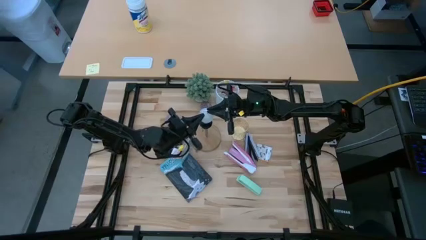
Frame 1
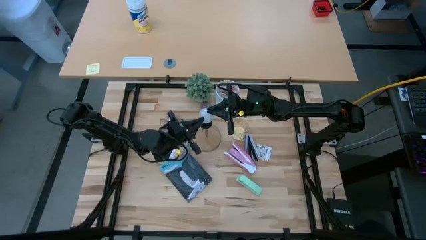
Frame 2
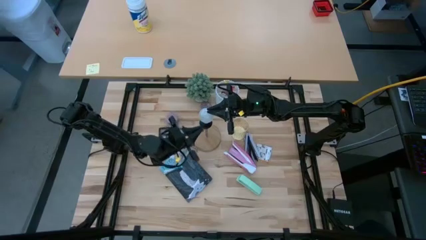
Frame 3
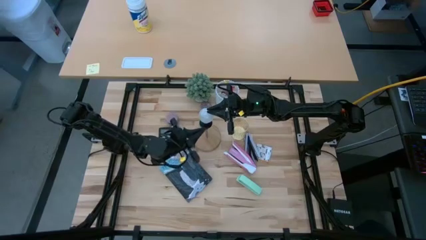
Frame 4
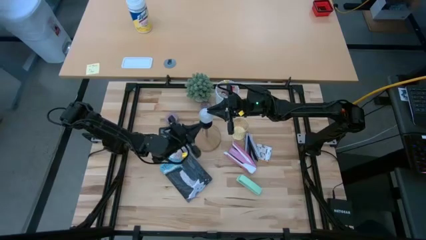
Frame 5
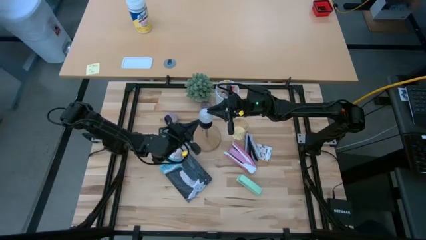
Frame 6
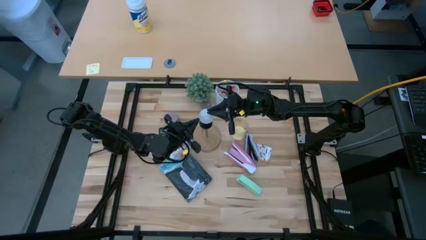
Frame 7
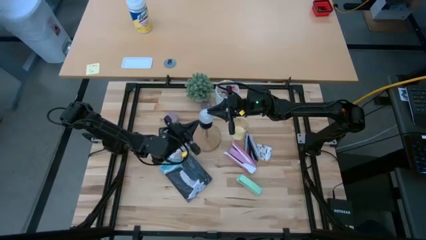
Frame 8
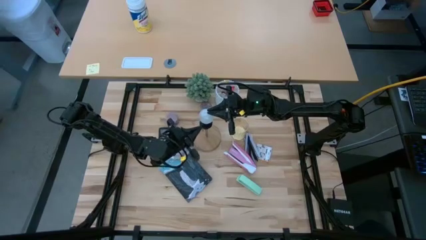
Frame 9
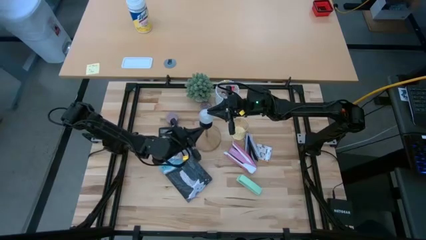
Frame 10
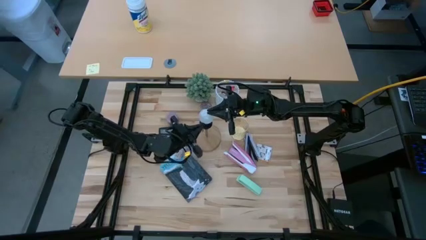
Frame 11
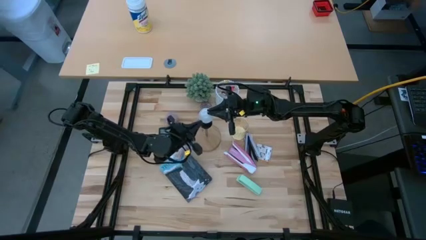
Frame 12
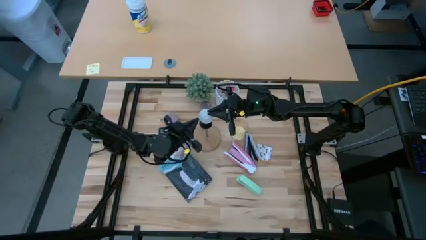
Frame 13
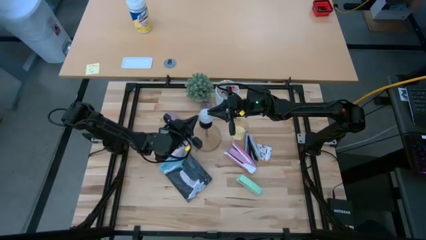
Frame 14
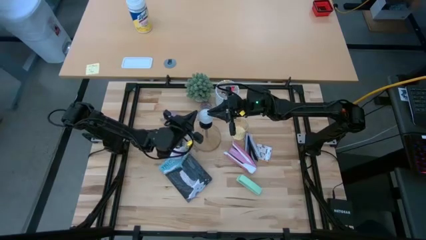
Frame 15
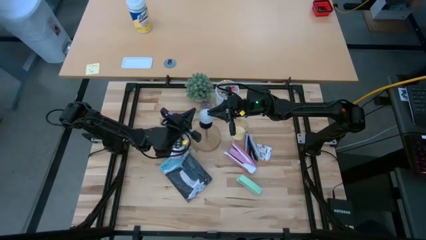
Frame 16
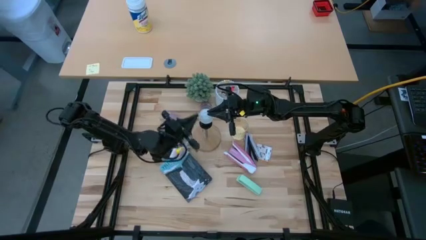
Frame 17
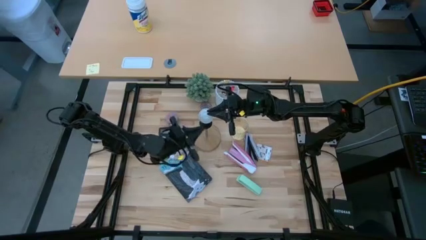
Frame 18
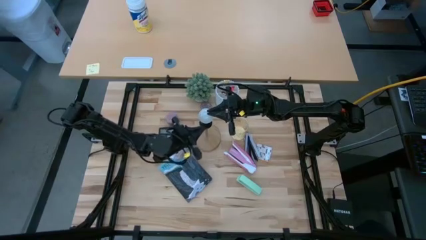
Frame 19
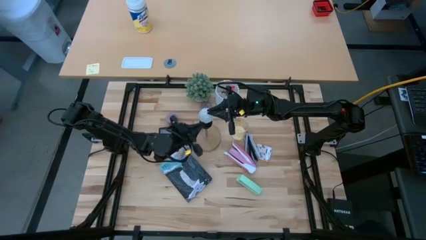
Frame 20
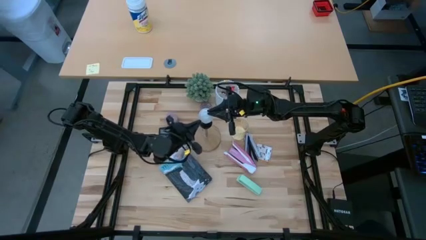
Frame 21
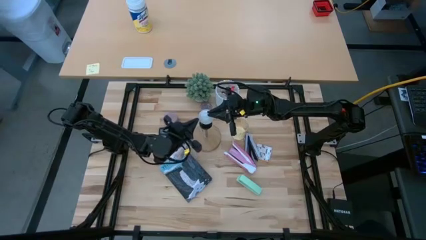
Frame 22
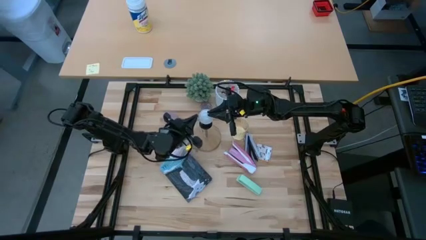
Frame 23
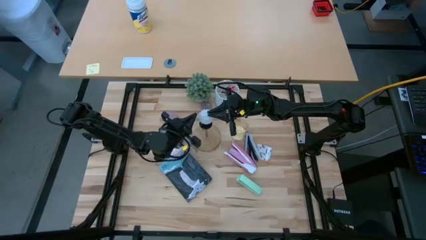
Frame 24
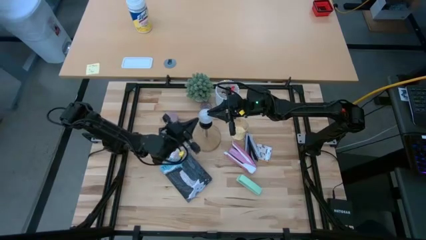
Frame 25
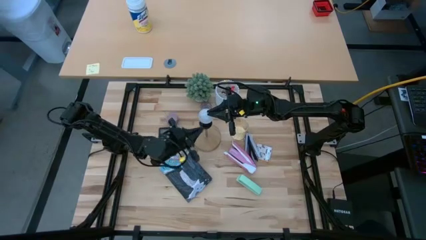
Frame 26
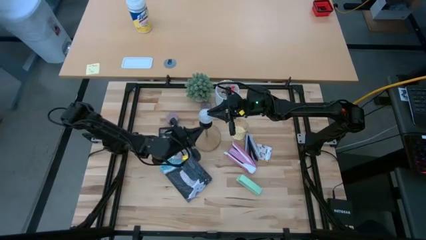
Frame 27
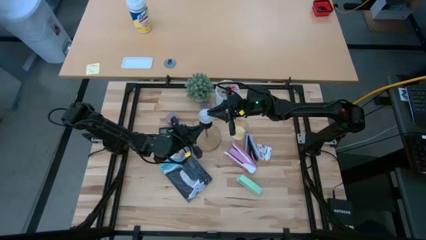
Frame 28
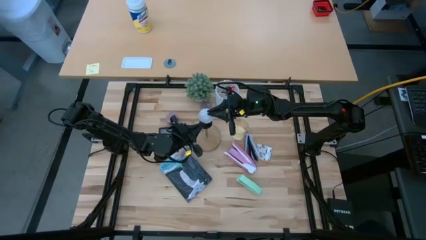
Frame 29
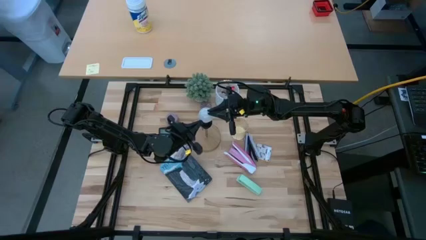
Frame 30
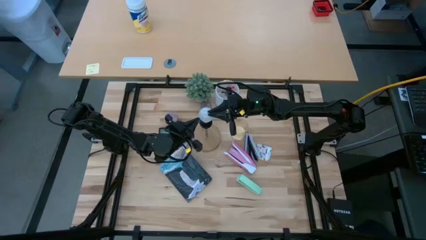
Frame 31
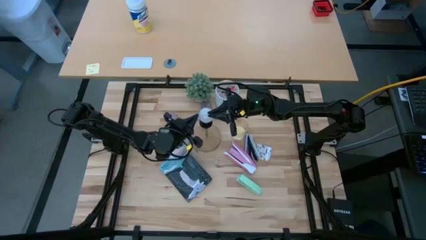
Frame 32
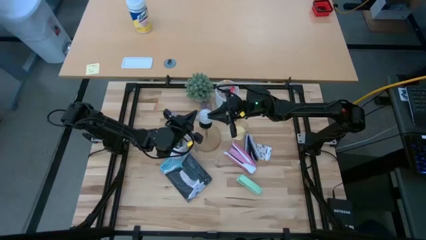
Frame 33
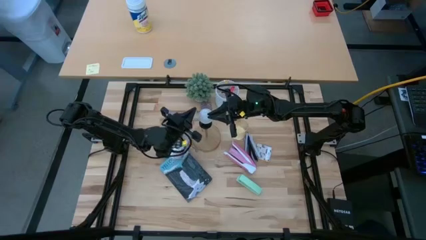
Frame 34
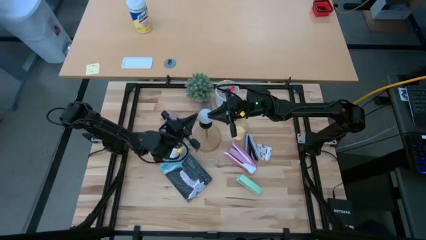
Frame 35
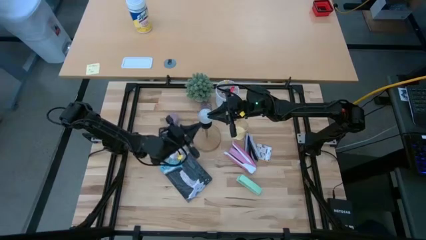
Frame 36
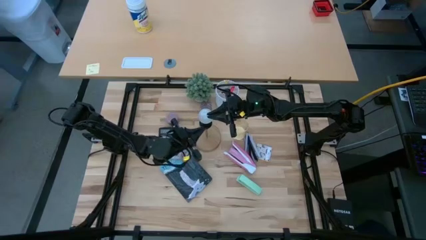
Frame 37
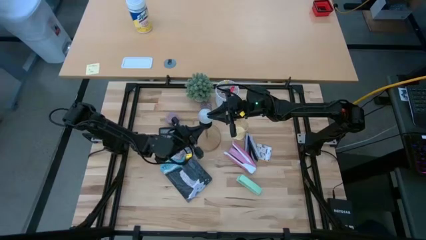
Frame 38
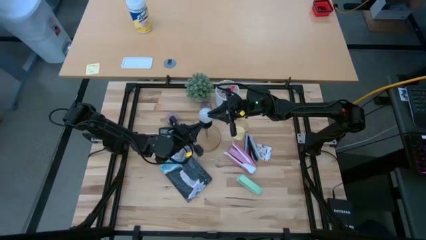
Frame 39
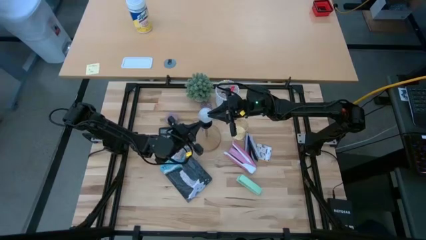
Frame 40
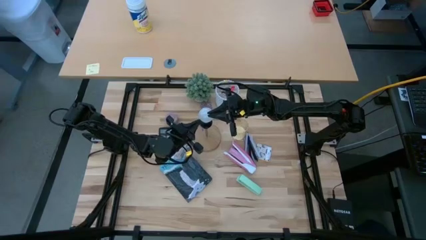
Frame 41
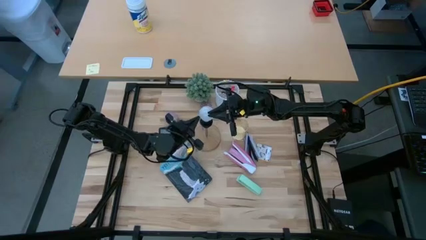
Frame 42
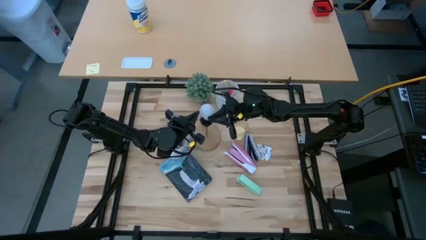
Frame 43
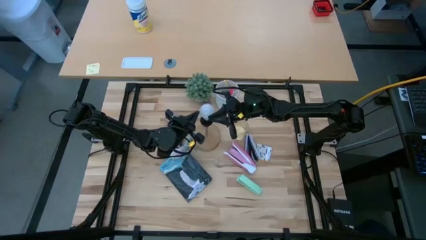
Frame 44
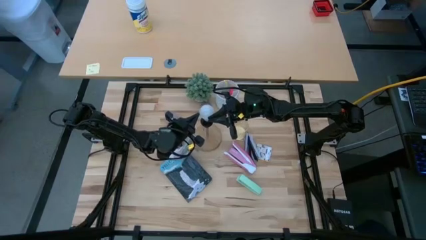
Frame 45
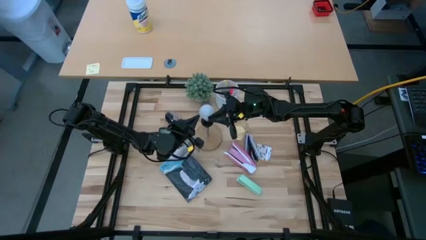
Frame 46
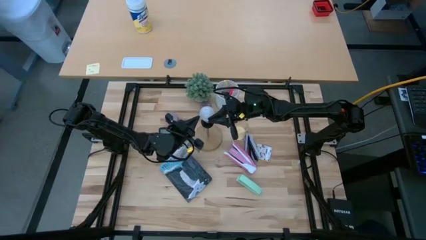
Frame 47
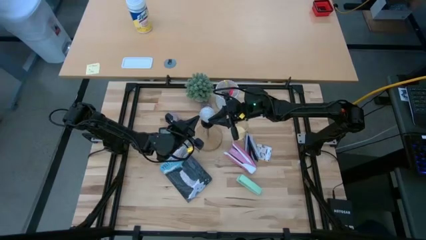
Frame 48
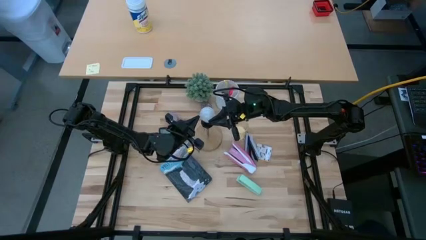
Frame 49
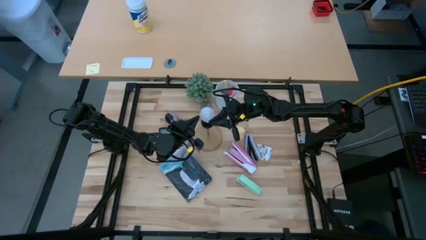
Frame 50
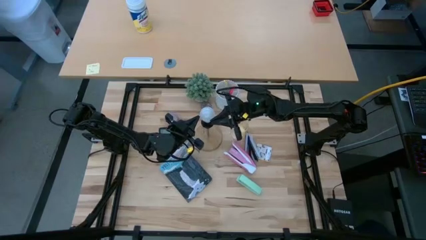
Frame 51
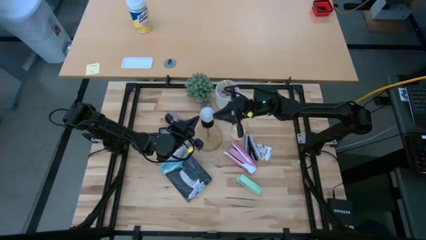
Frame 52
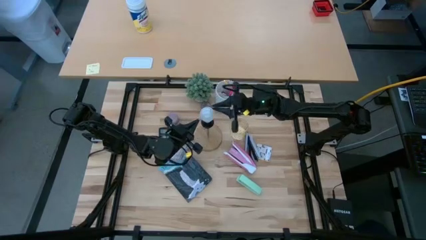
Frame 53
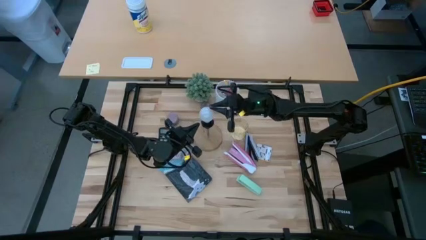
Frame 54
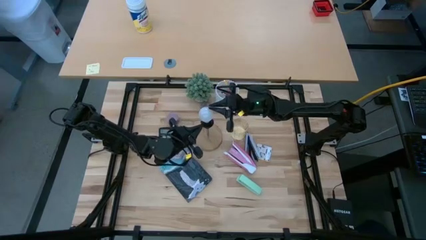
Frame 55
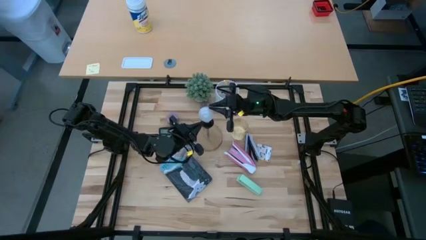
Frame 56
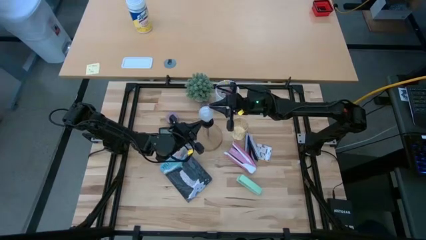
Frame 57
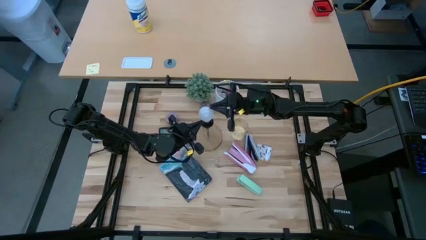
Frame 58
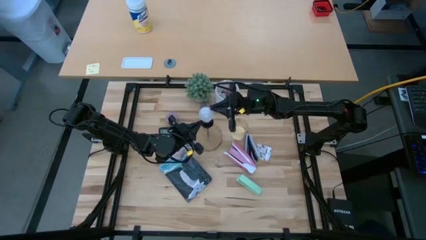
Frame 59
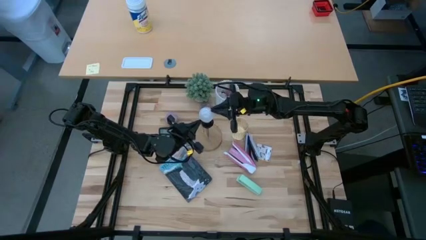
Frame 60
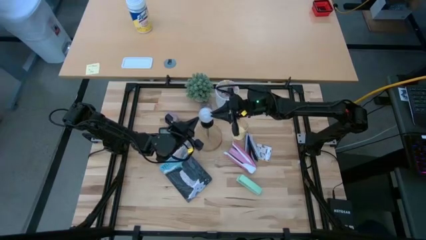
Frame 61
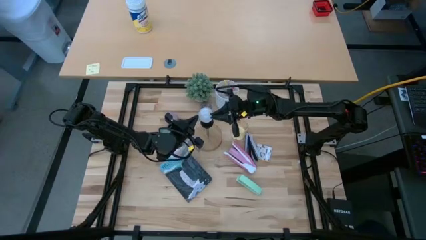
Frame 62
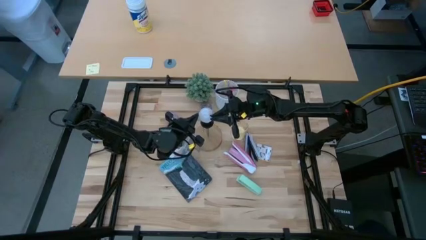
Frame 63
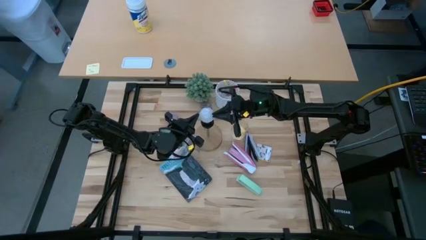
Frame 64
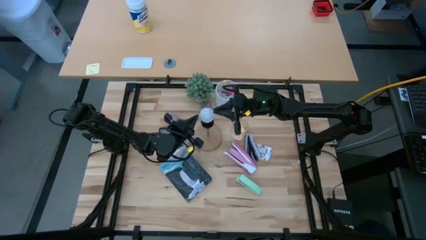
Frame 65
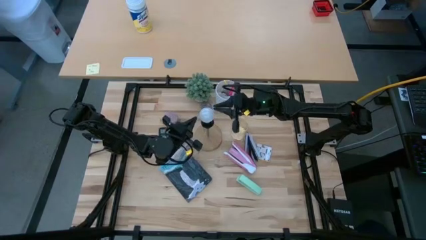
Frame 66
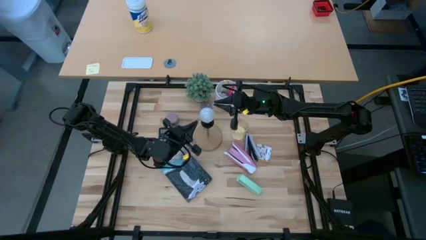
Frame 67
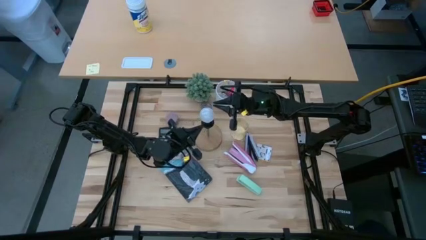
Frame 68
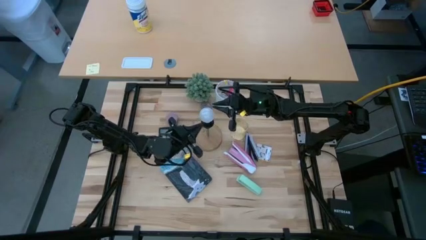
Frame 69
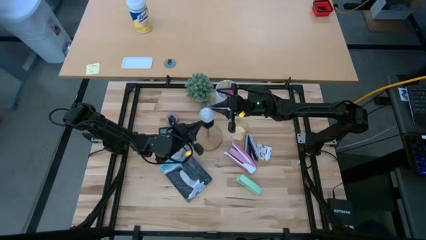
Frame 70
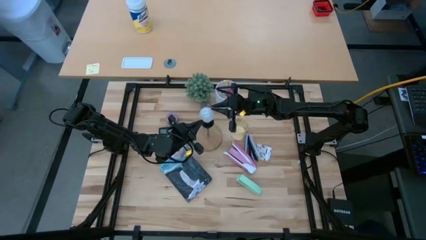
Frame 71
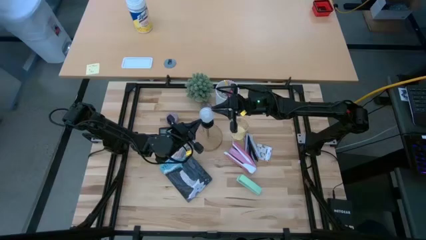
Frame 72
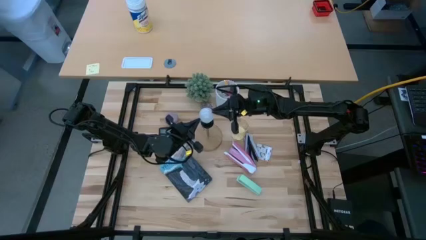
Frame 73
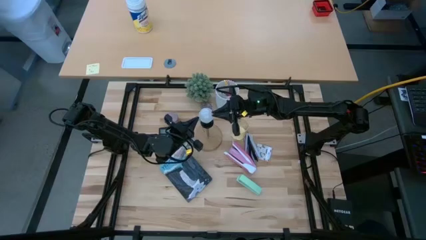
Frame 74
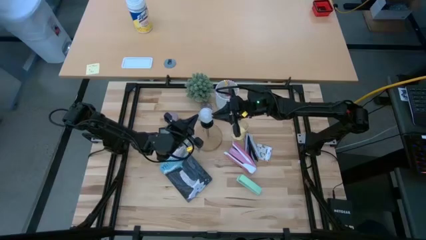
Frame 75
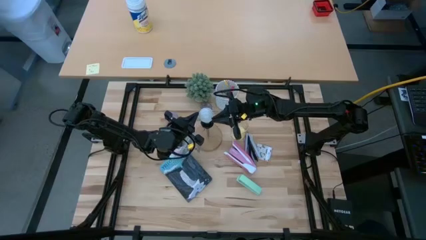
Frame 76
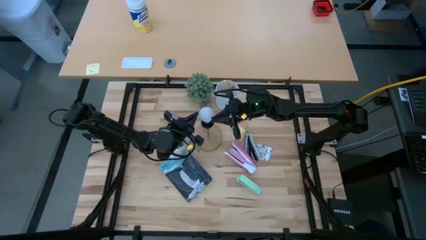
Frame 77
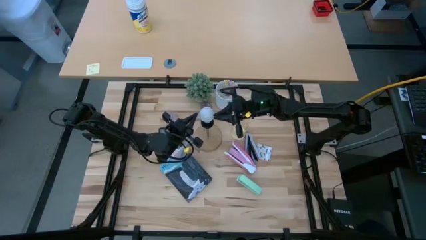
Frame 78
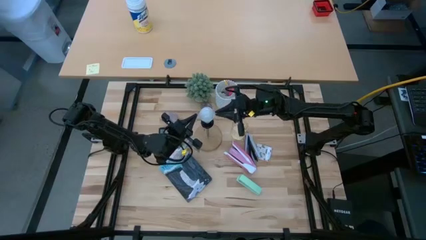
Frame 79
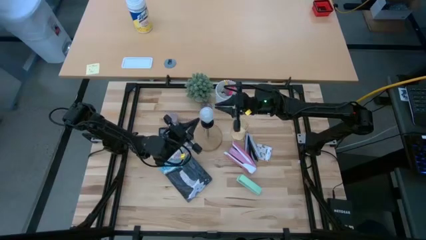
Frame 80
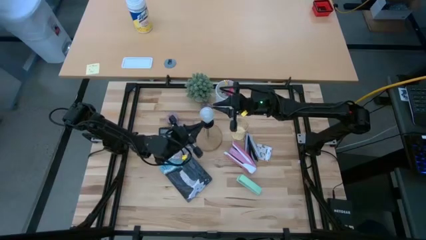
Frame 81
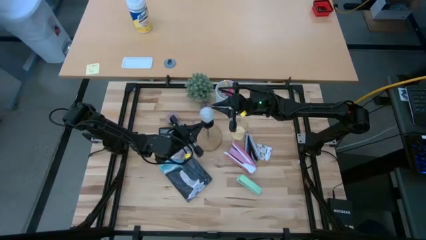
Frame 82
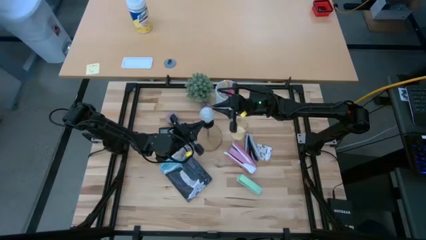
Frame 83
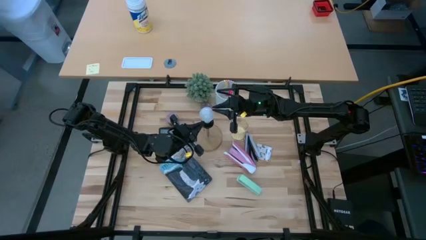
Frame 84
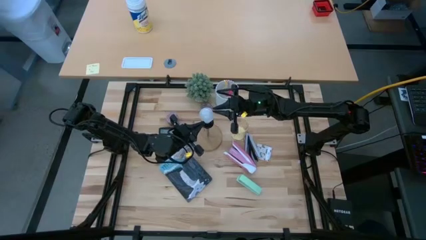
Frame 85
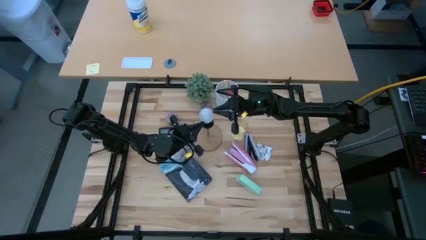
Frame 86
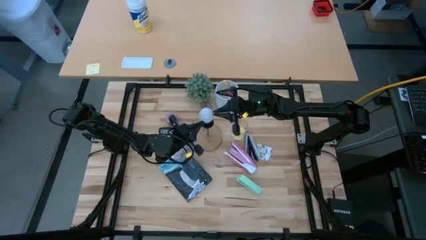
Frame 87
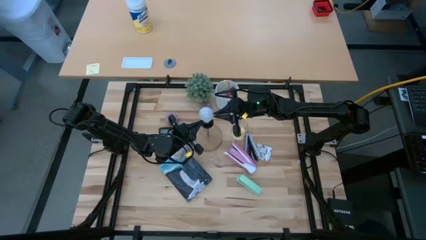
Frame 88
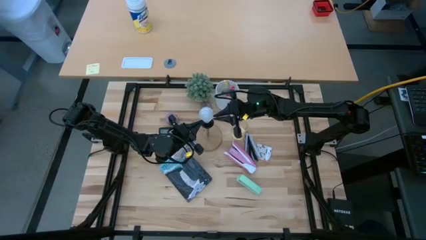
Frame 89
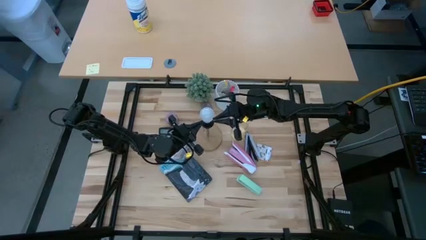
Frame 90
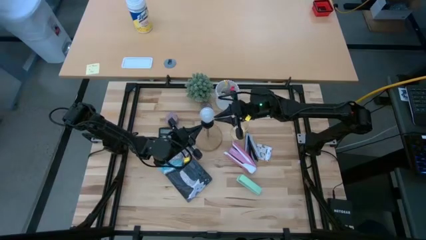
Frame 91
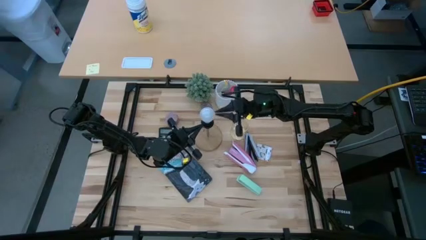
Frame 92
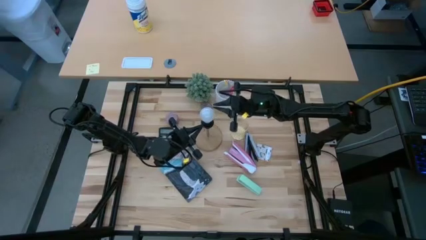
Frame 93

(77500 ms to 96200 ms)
Task: Screw lightbulb
Insert the lightbulb into the lamp
